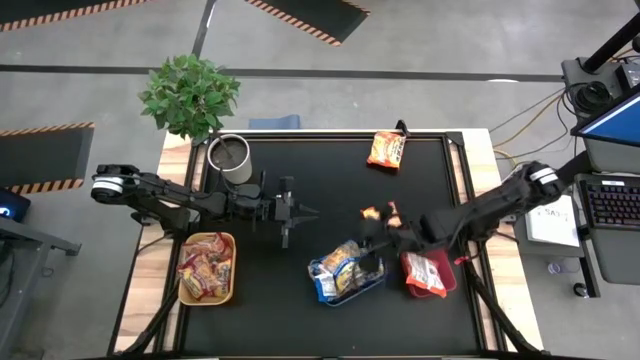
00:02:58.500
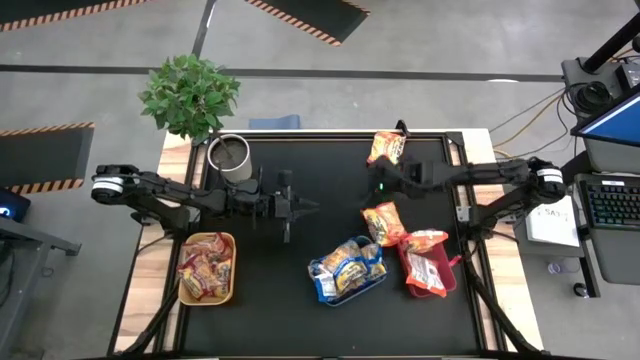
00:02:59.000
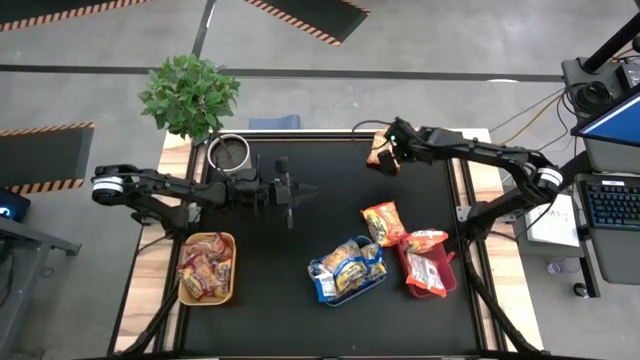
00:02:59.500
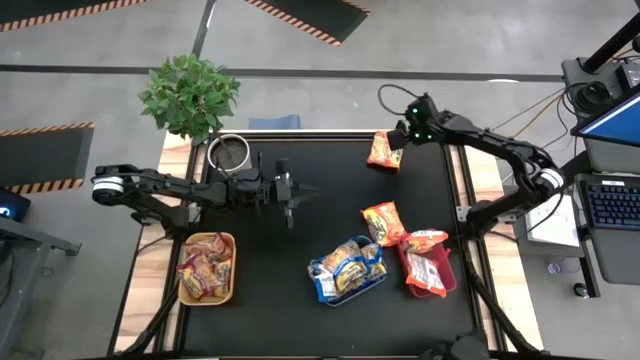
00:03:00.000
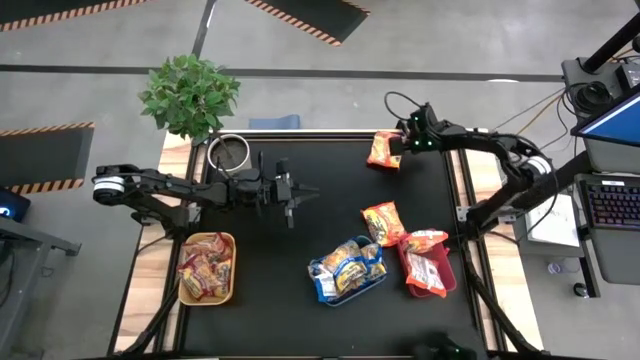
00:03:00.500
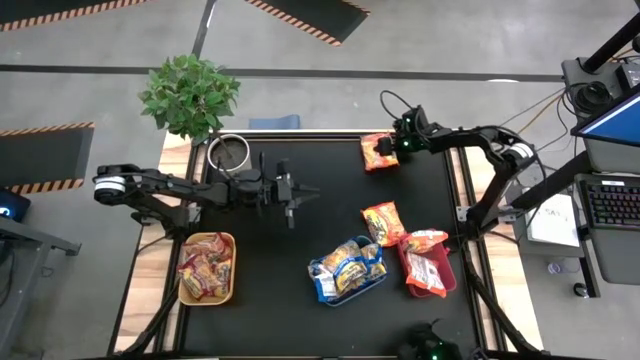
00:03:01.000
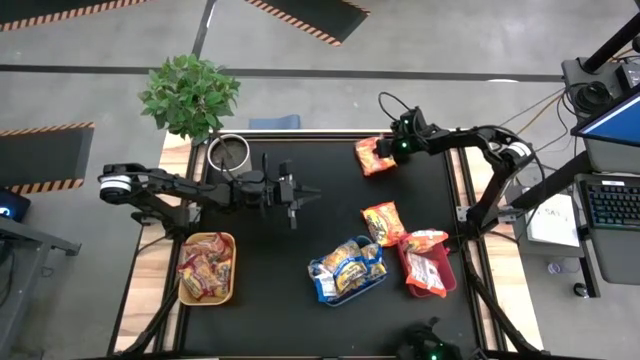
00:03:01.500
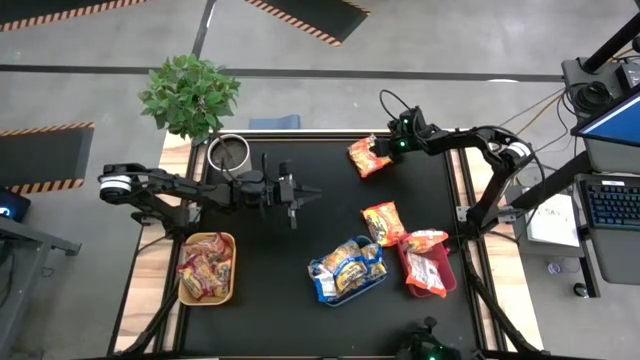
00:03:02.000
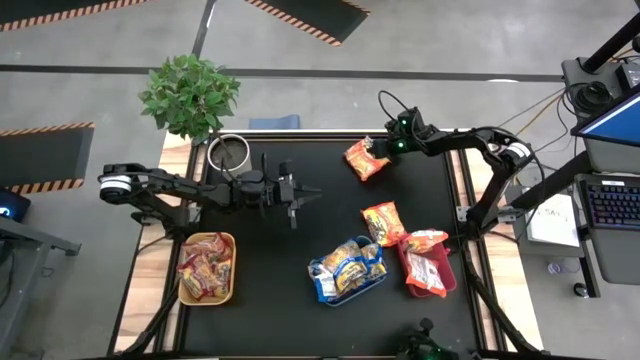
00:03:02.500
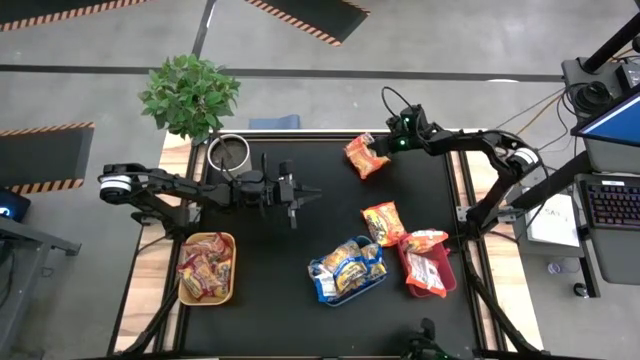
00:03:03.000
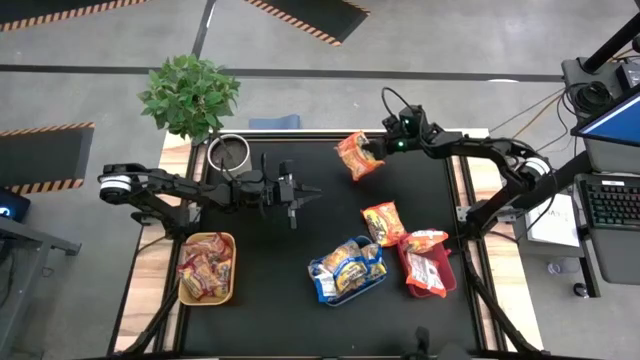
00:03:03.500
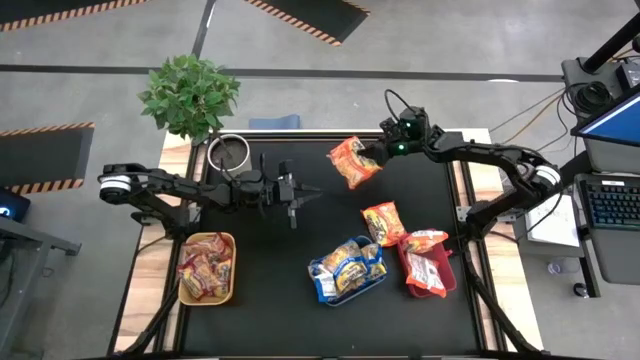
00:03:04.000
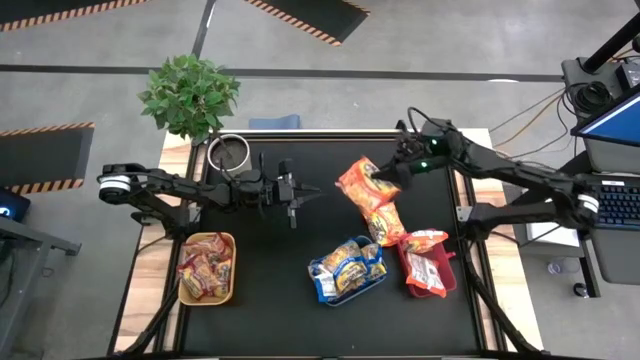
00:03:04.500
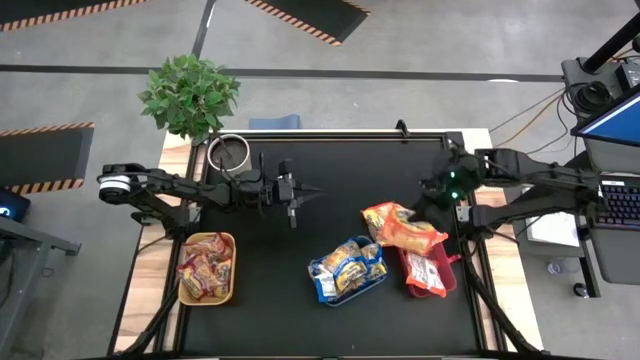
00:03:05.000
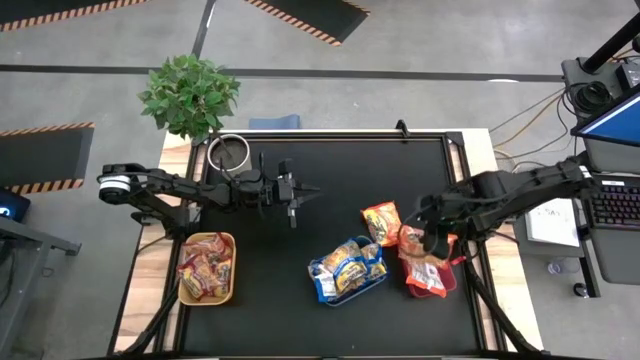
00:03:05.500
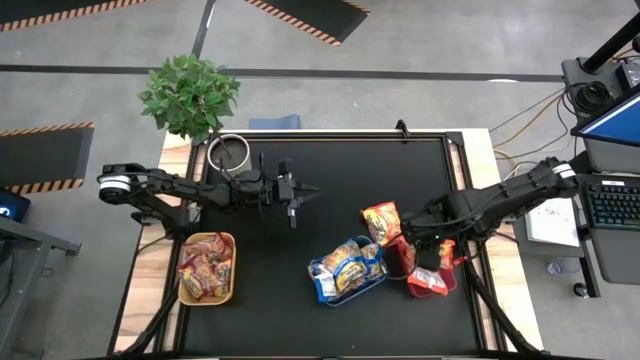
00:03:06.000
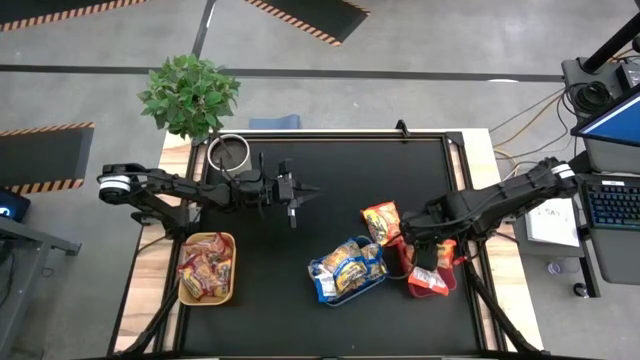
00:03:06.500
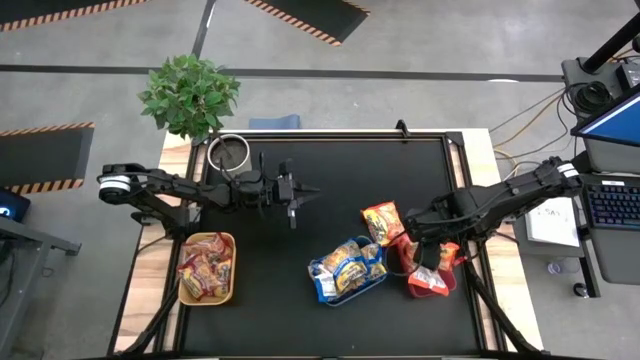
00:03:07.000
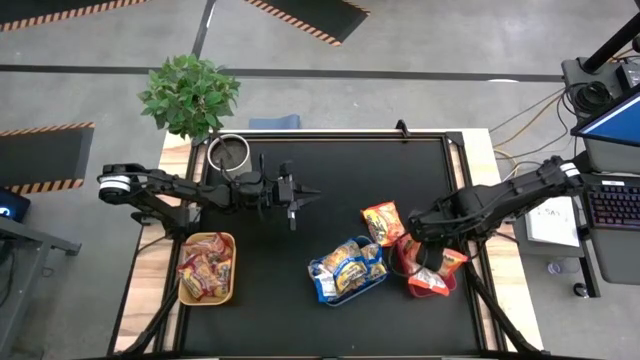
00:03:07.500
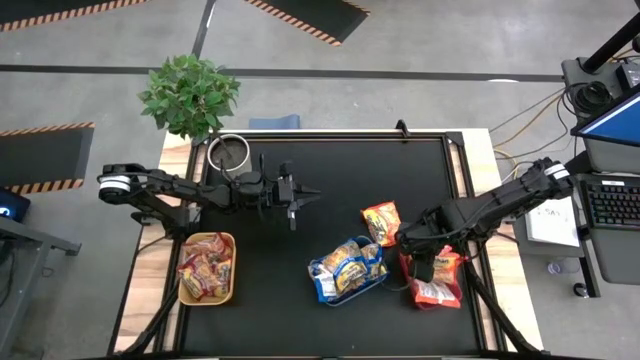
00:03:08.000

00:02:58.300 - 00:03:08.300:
Task: Sort Maruchan noodles
Put the top orange noodle pack into the red bin

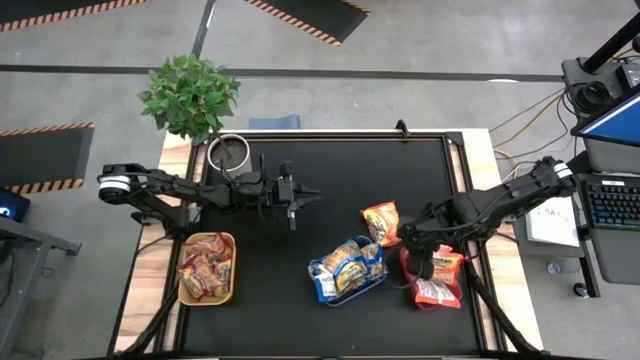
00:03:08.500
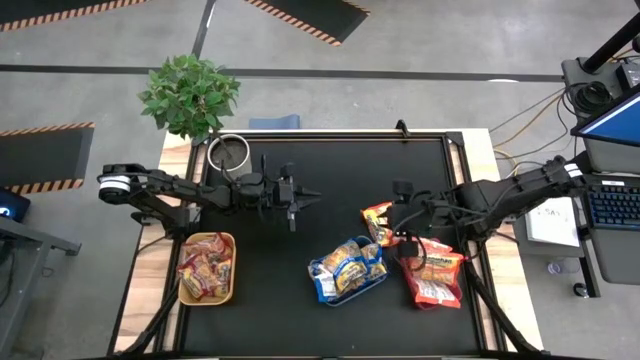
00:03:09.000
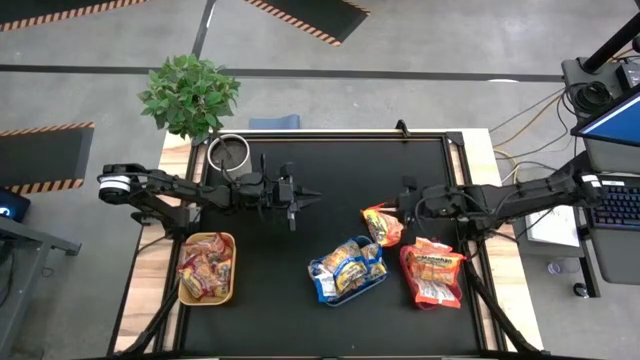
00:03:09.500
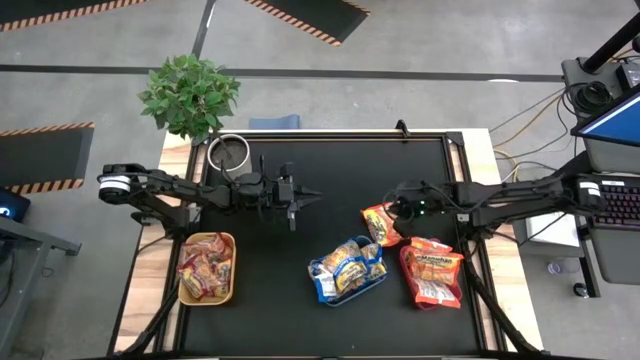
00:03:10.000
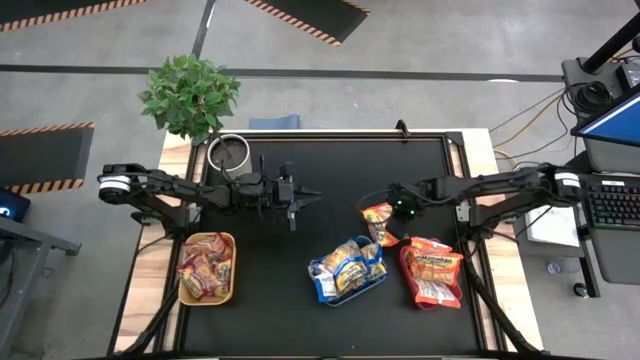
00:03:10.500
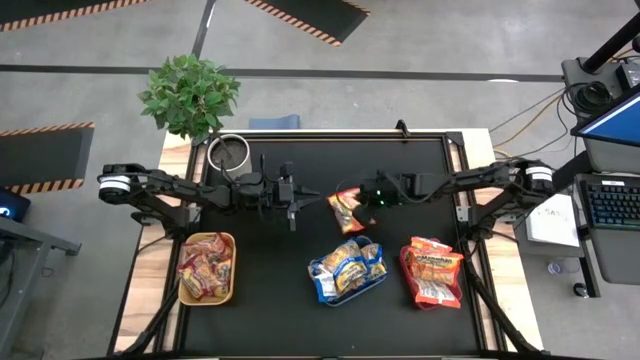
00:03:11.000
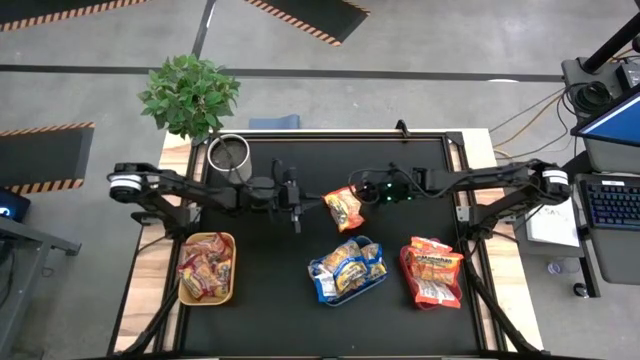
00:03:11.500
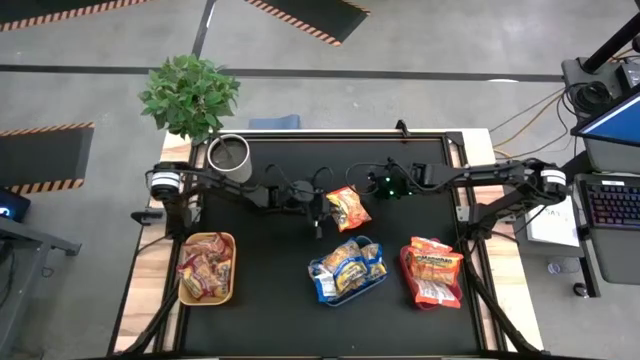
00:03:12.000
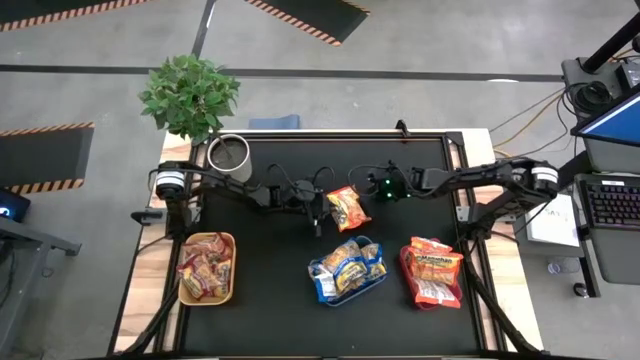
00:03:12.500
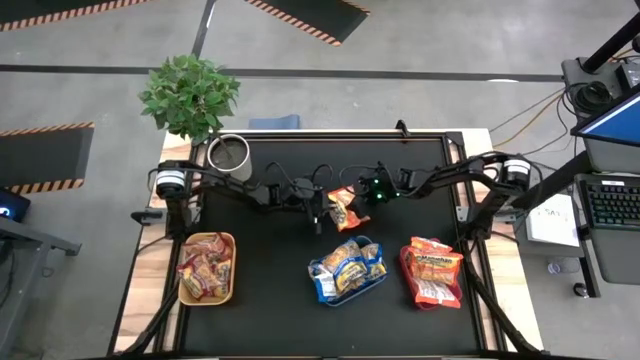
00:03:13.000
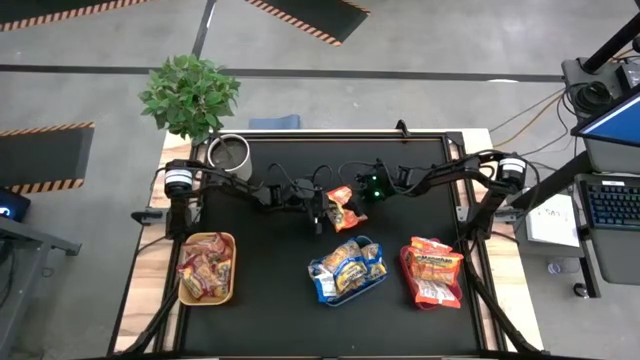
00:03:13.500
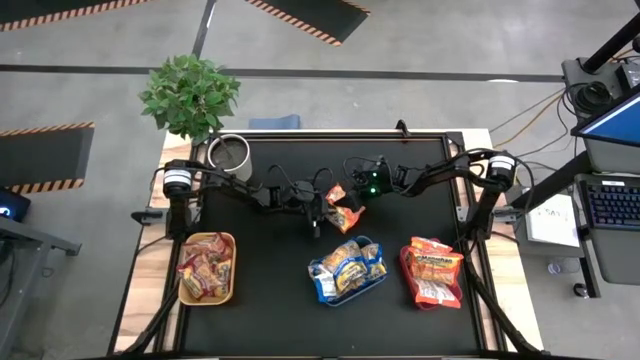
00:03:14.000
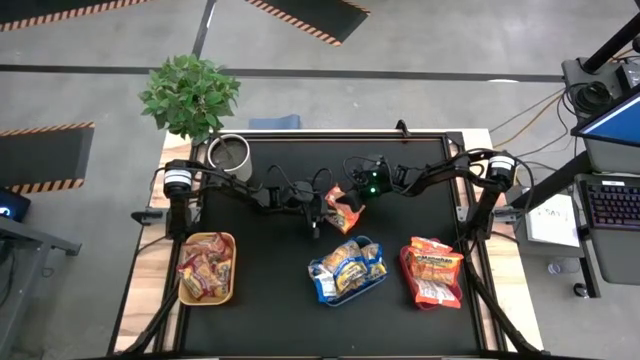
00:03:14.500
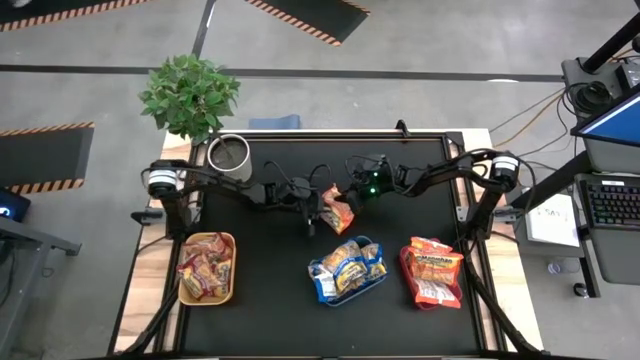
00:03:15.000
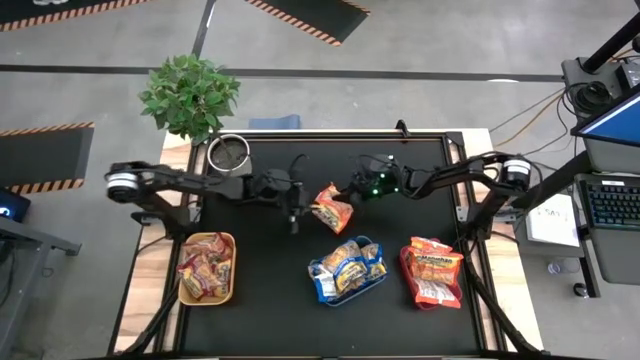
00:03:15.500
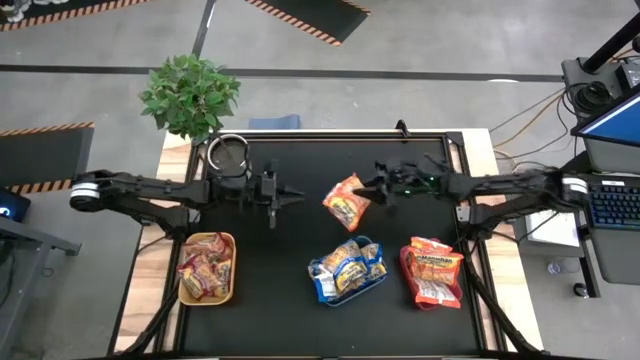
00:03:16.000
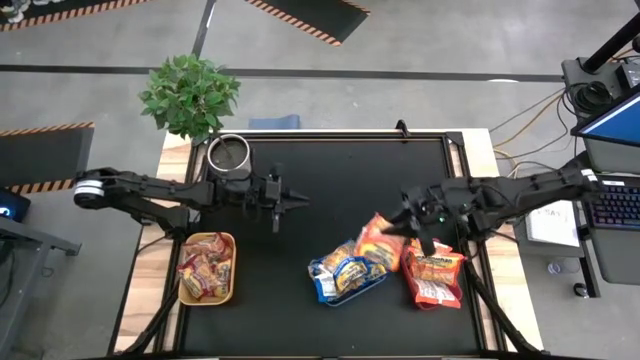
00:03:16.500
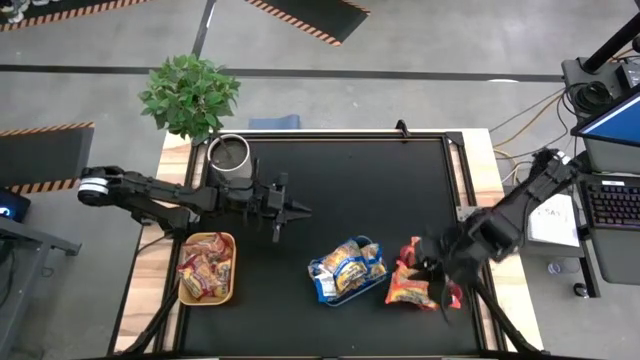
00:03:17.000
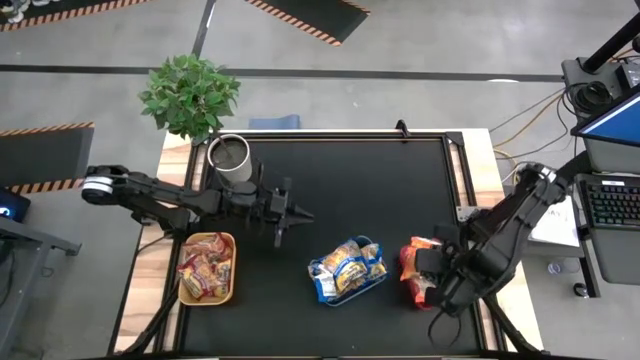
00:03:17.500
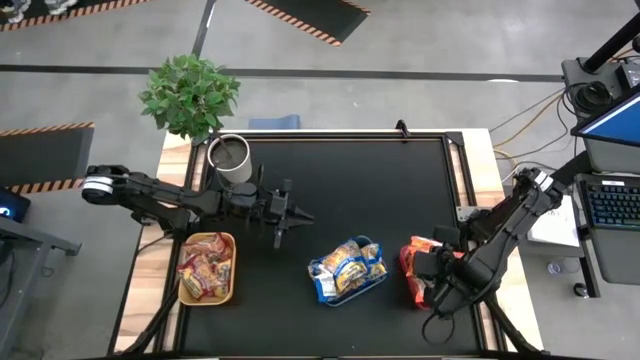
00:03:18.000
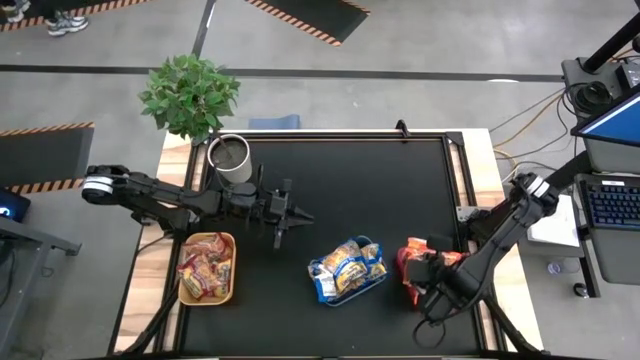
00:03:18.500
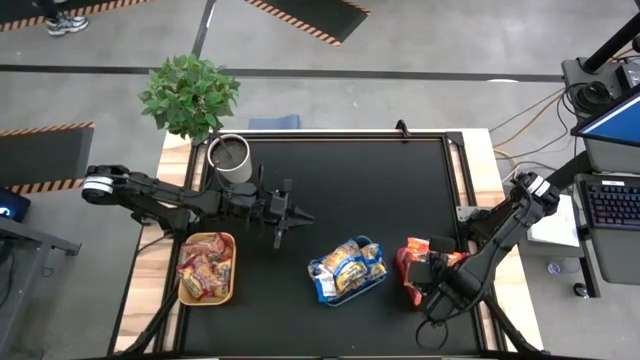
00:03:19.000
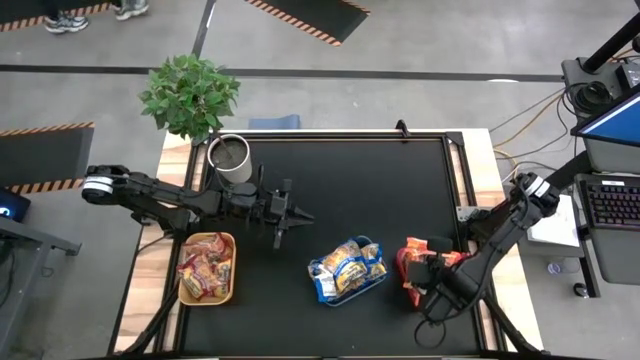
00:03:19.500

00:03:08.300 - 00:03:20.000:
Put the orange noodle pack into the red bin
